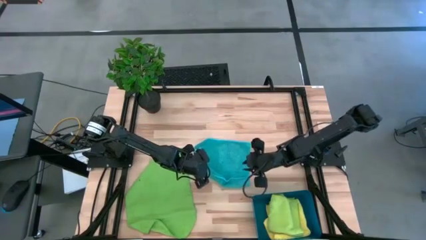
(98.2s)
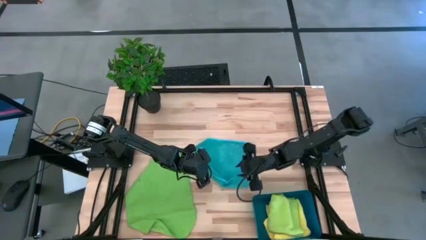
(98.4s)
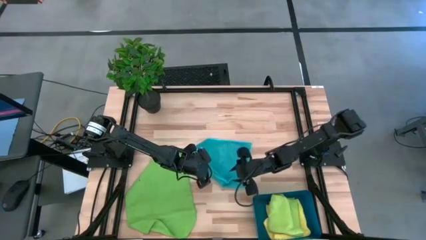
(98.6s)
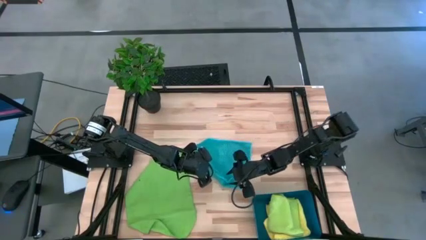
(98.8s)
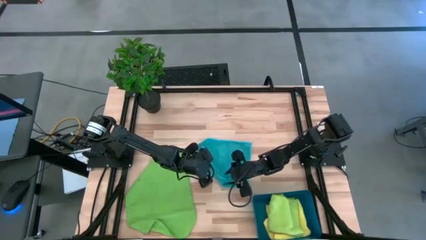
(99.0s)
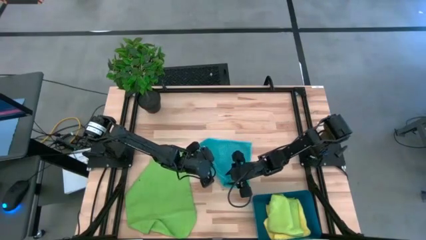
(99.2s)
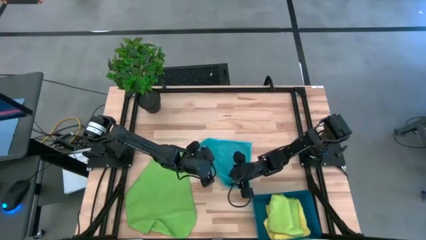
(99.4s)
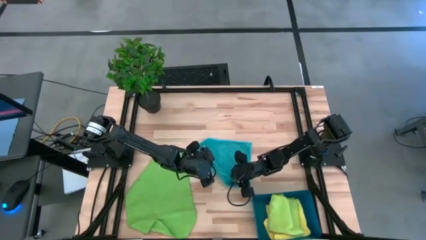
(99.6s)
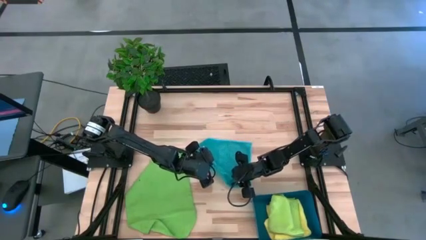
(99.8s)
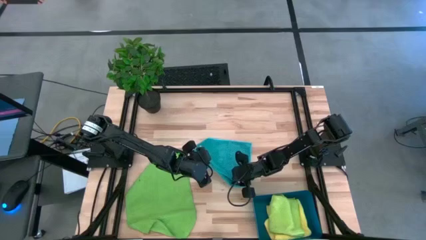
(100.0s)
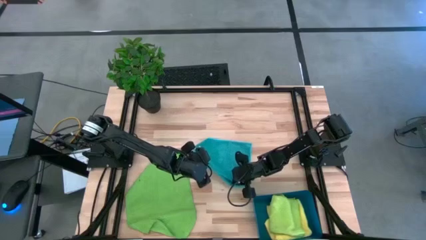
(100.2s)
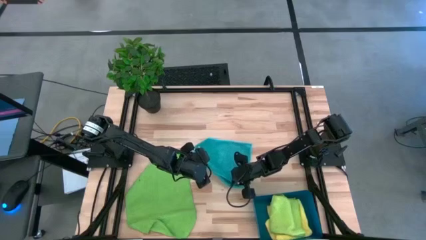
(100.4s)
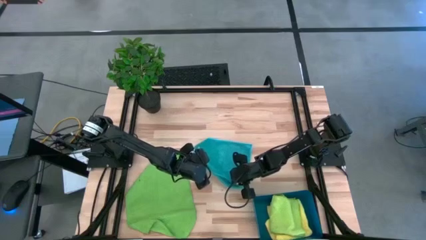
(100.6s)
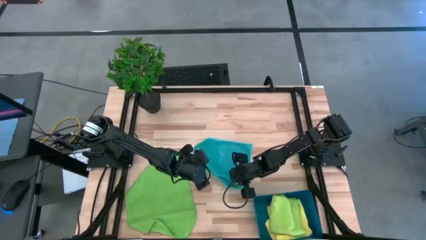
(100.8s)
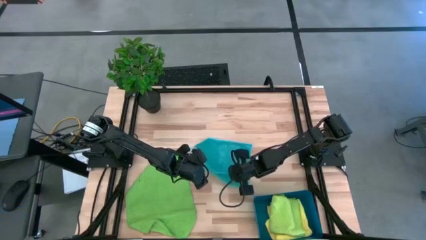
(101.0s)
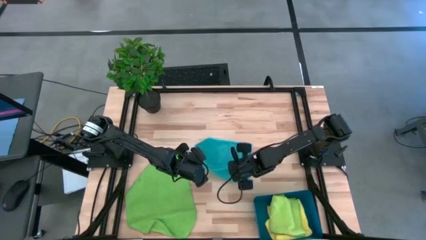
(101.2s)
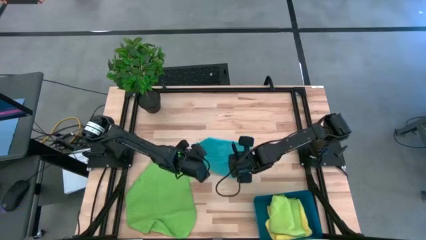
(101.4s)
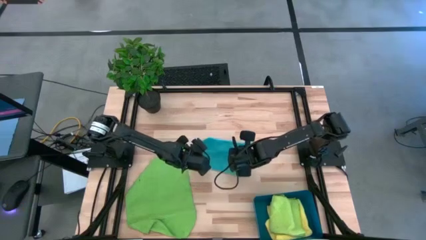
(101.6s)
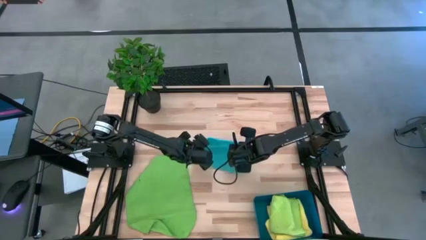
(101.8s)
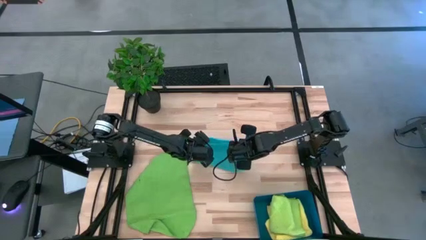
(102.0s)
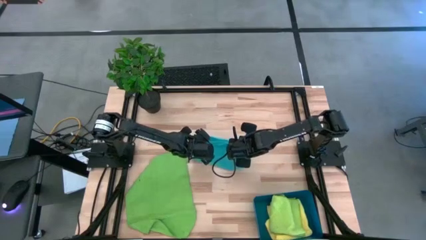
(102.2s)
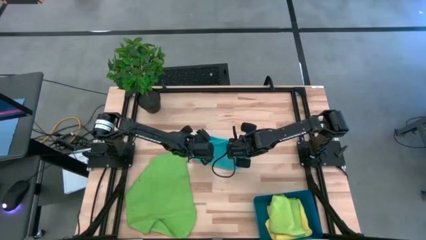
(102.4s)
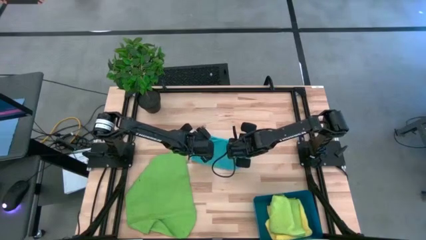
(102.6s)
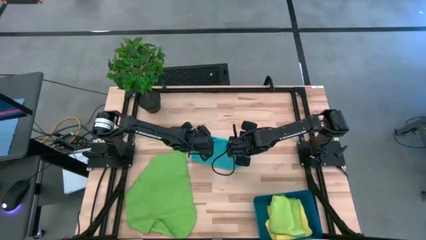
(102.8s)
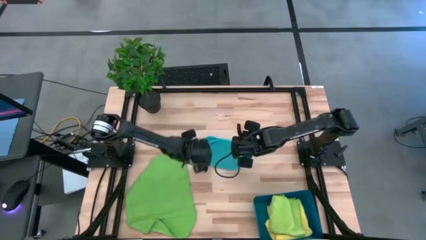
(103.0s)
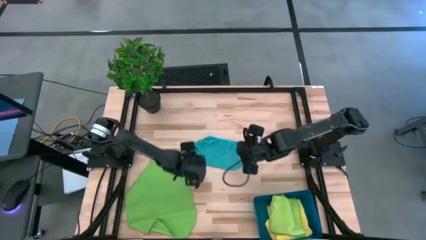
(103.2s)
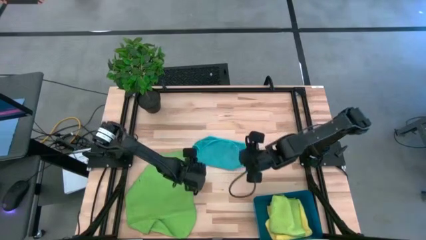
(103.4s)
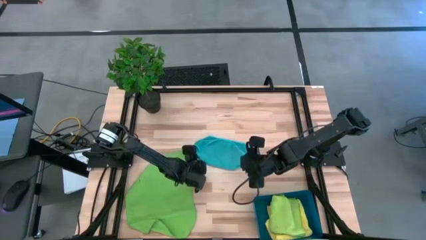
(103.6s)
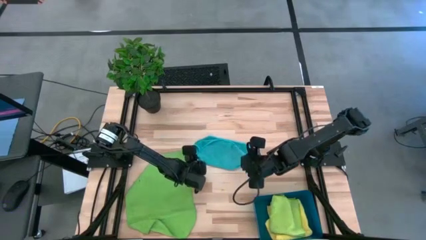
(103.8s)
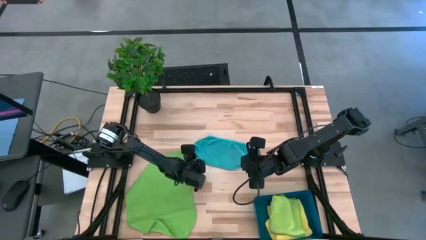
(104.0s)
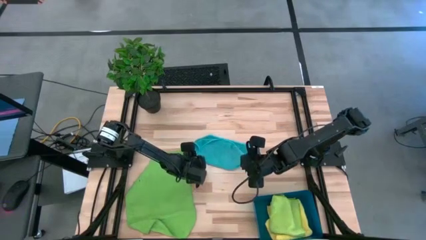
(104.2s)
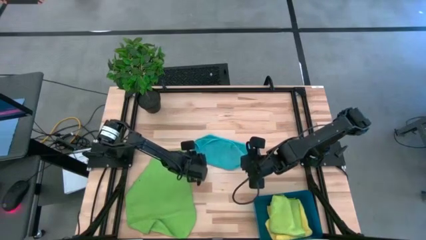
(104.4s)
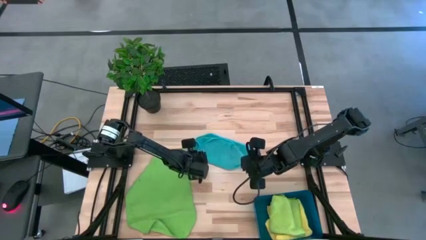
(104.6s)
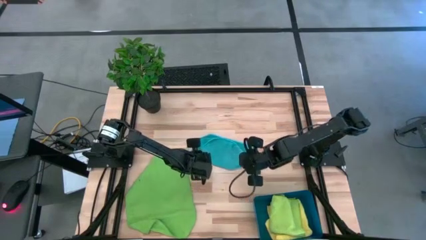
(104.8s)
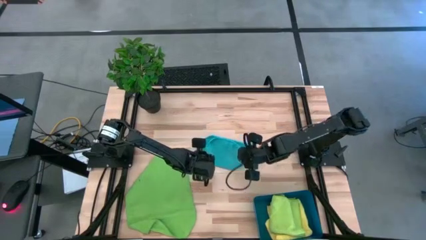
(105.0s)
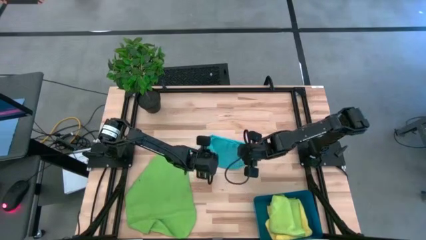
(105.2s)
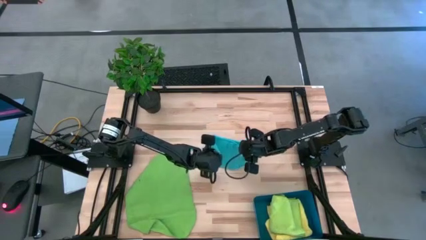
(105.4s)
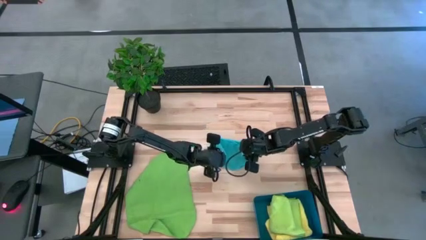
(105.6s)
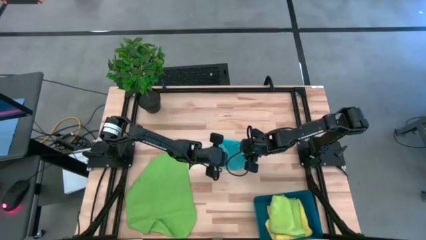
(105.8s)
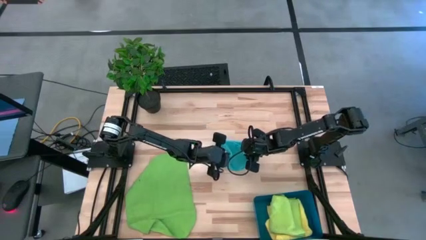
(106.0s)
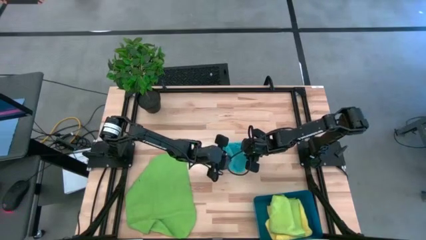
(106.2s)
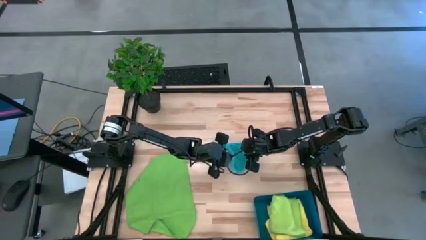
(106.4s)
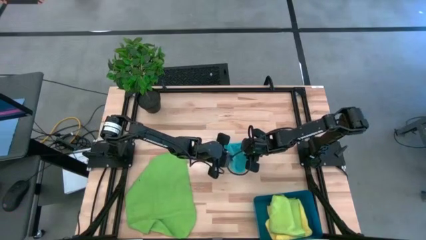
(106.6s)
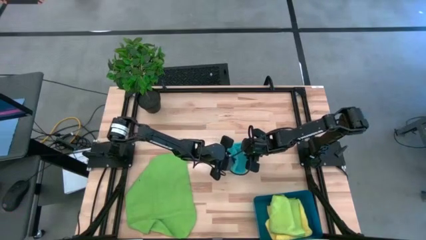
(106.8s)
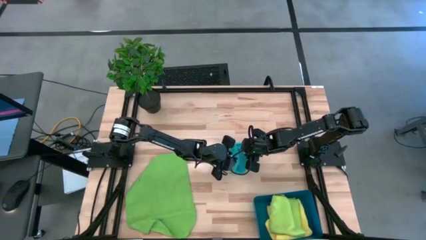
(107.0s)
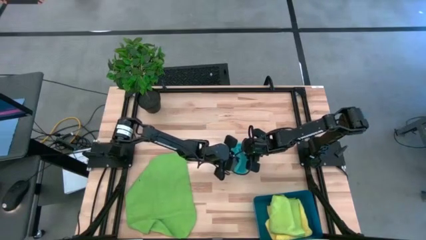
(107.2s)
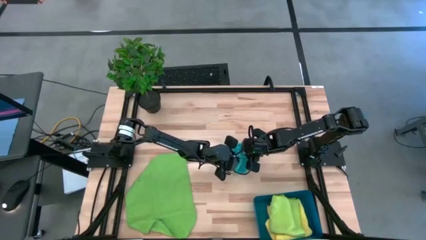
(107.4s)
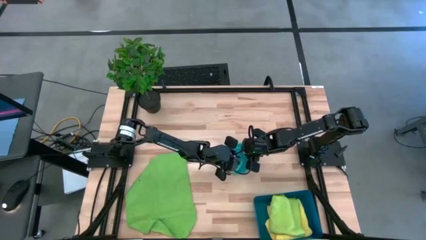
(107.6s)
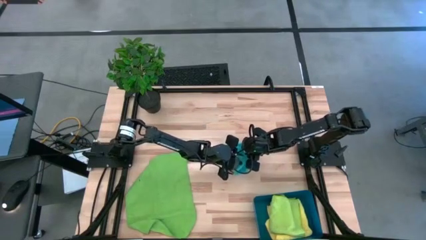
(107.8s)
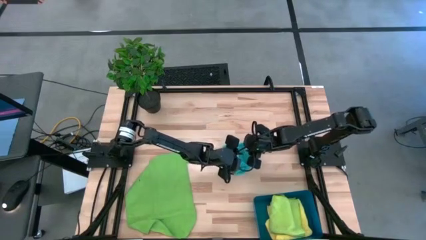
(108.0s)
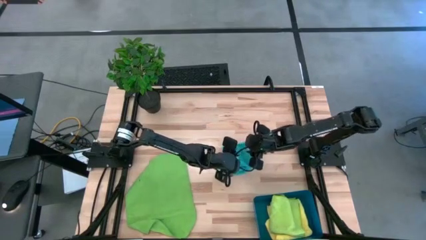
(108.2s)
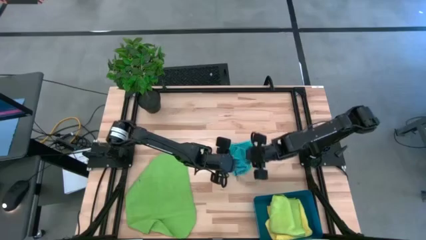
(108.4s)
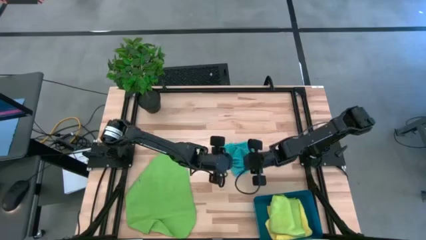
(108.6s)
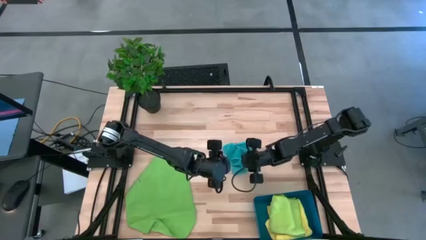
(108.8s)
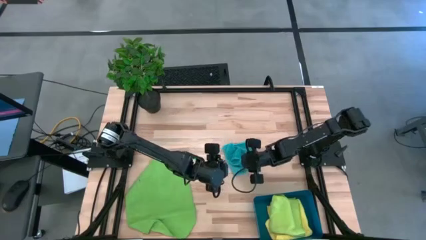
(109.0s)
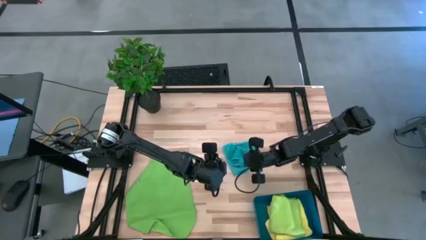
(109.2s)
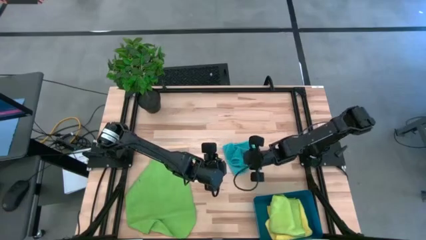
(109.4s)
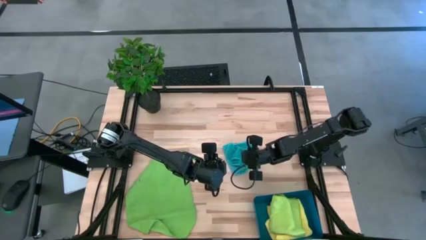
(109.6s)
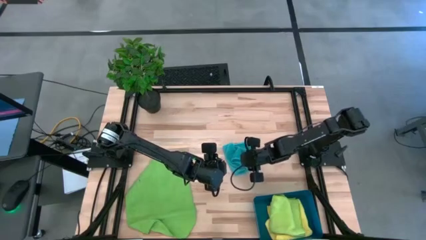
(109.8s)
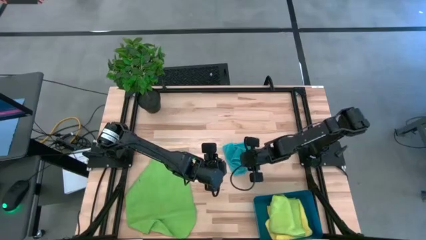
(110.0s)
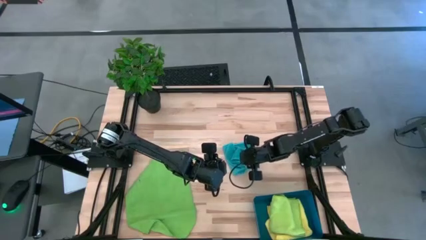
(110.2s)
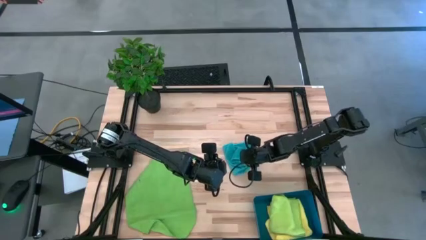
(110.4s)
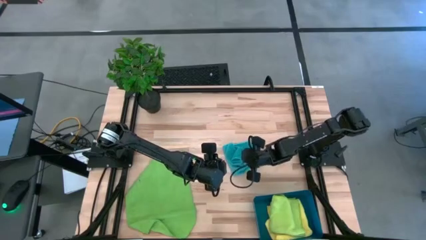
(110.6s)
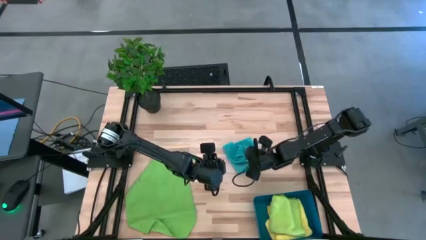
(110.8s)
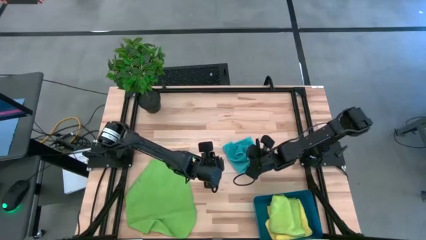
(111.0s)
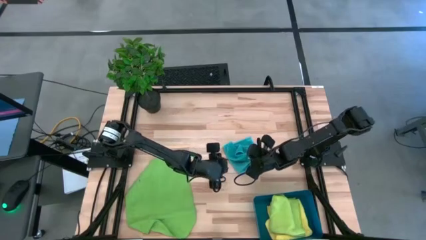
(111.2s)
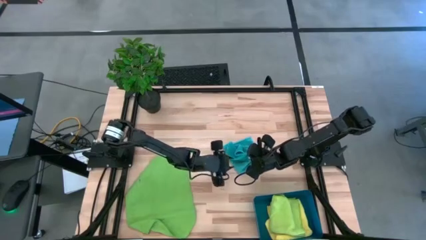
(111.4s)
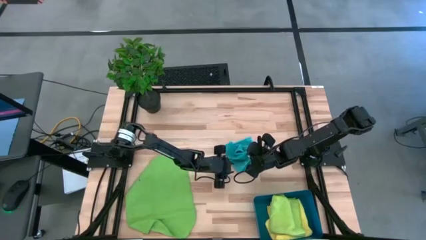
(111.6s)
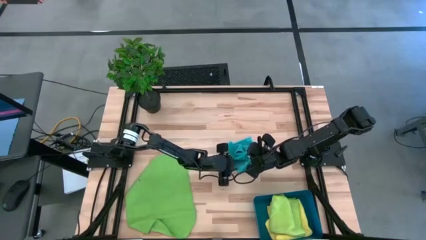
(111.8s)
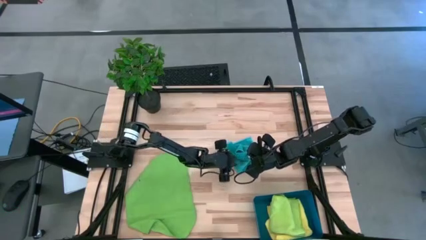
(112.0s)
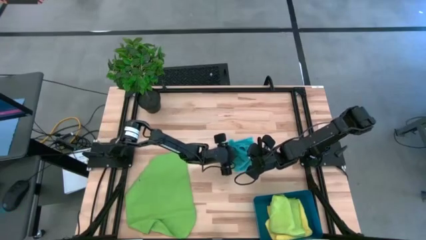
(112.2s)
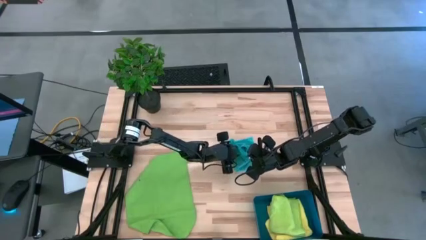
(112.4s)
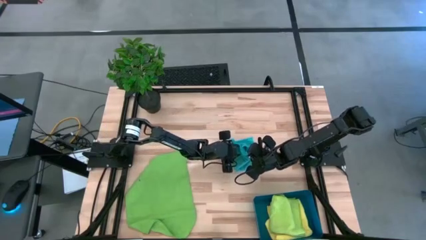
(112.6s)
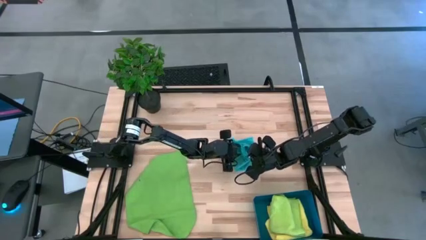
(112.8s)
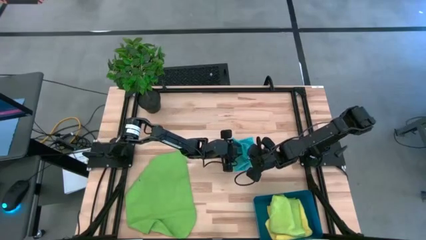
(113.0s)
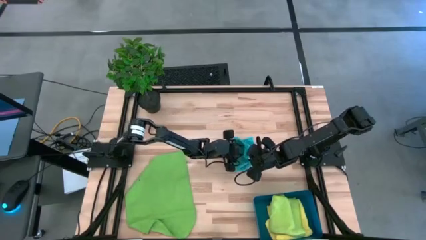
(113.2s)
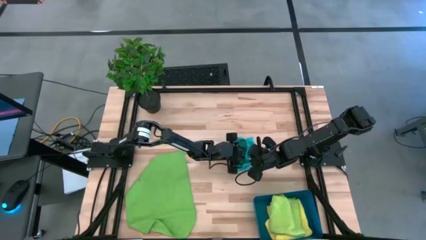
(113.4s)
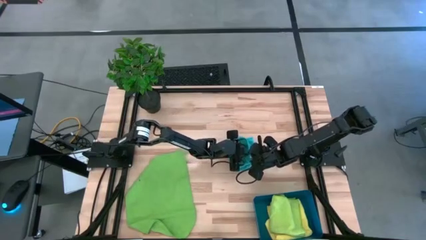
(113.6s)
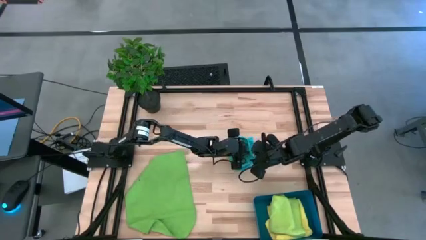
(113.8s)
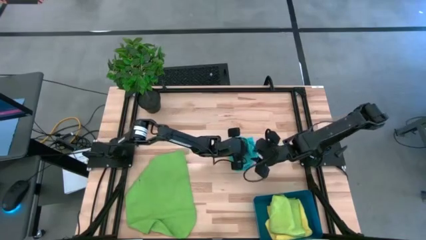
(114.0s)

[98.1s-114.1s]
Task: Fold microfiber towels
Fold the blue towel
